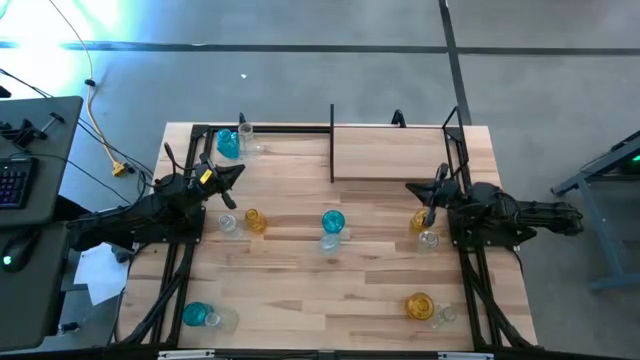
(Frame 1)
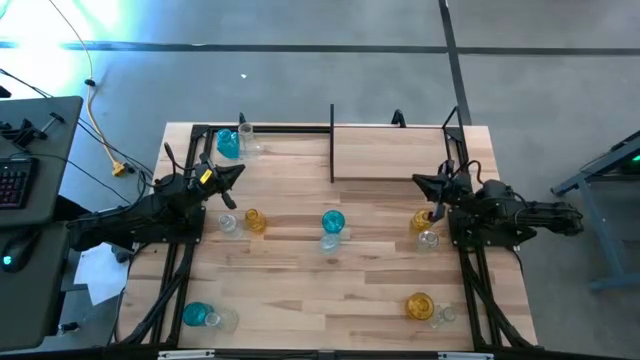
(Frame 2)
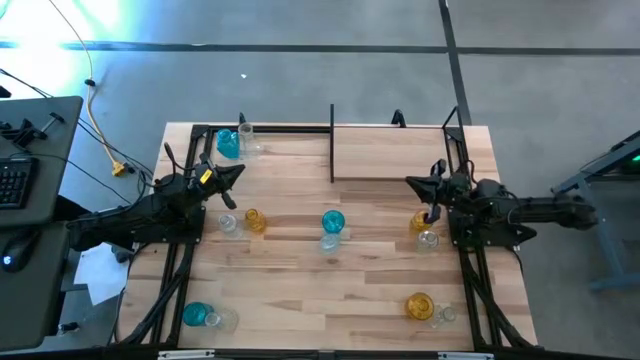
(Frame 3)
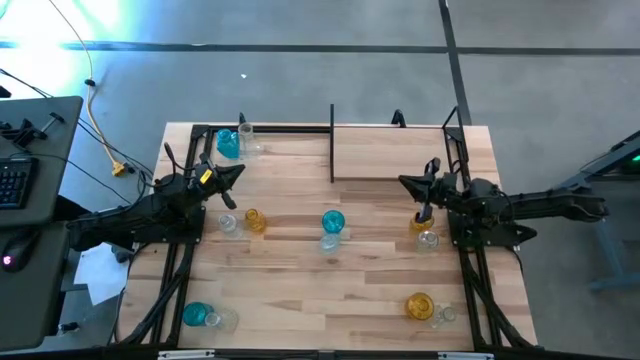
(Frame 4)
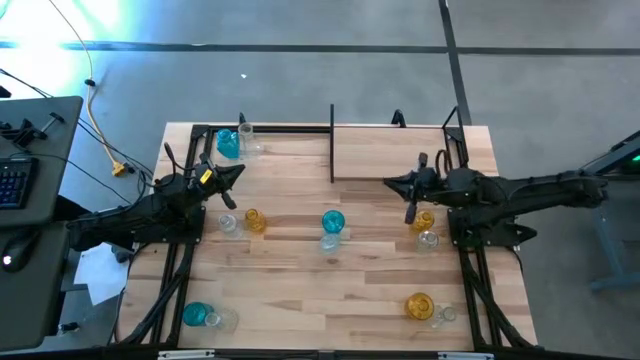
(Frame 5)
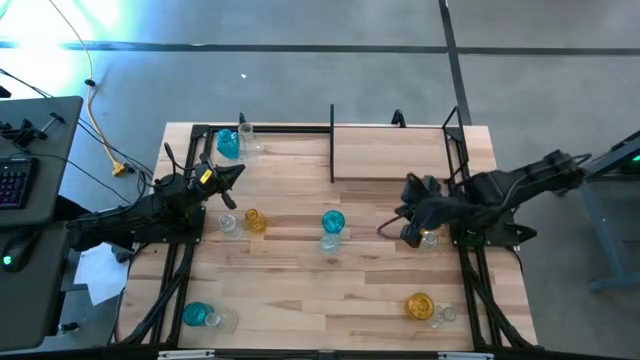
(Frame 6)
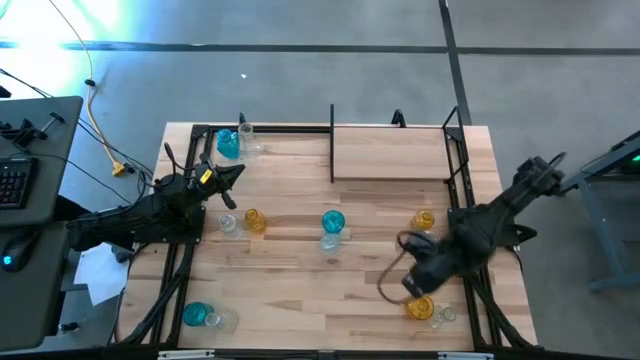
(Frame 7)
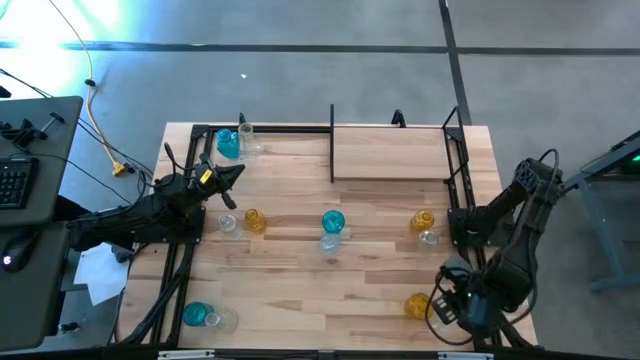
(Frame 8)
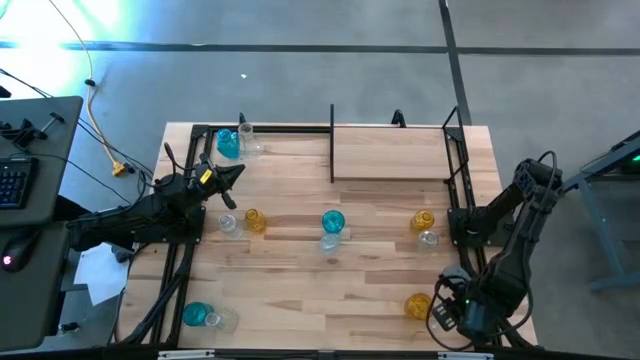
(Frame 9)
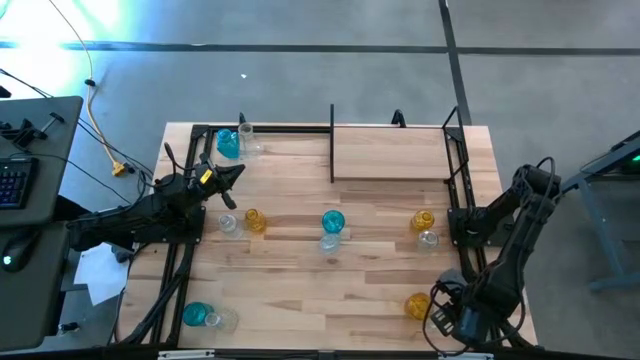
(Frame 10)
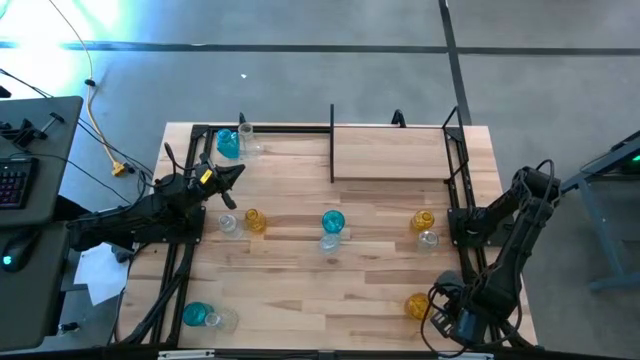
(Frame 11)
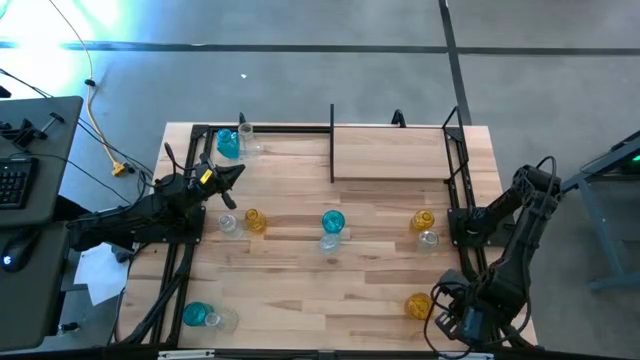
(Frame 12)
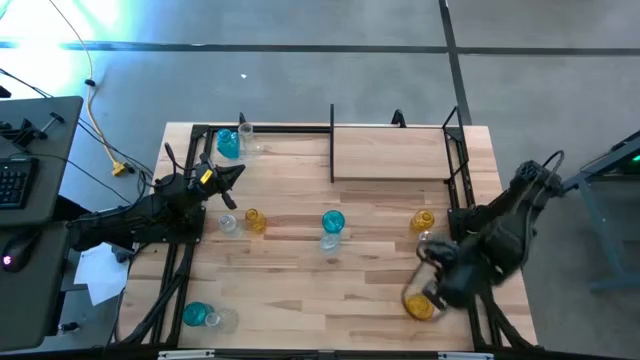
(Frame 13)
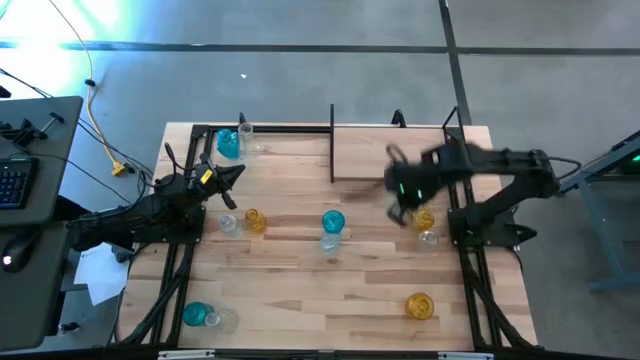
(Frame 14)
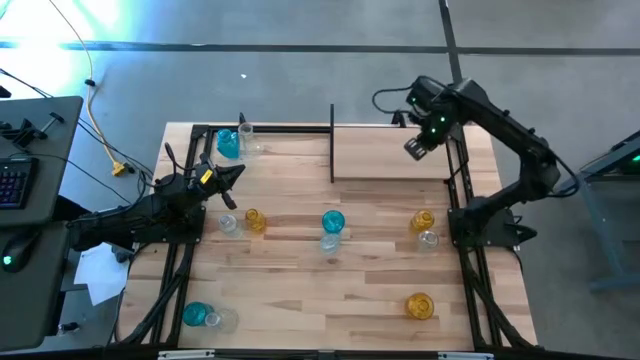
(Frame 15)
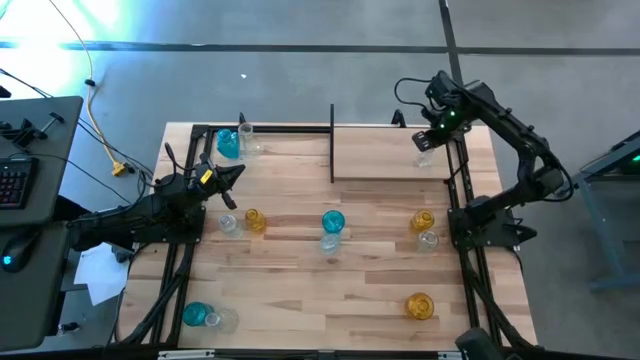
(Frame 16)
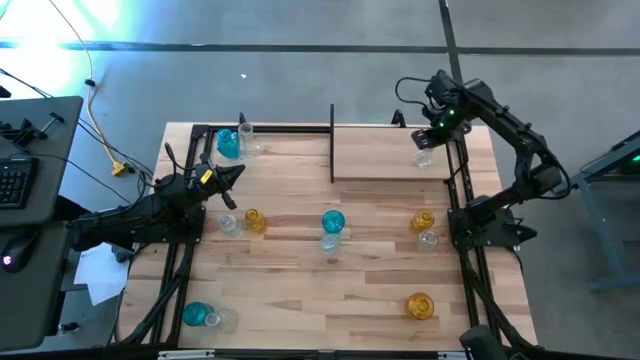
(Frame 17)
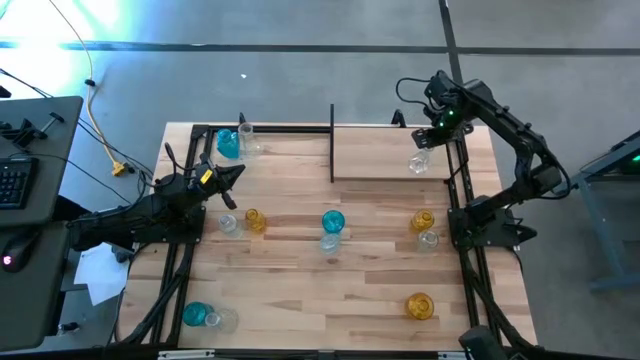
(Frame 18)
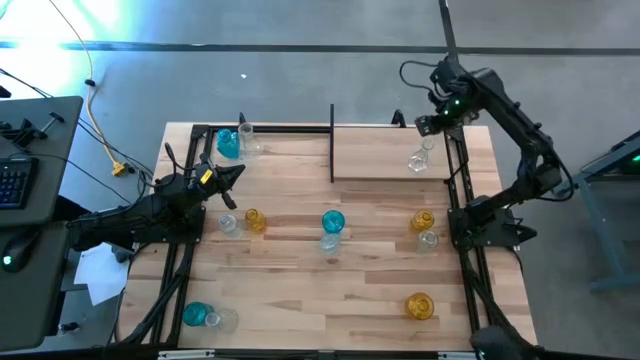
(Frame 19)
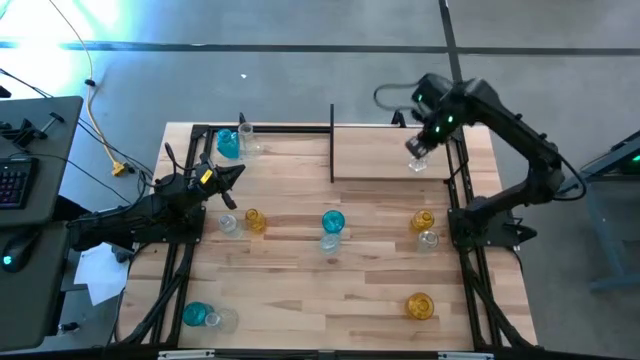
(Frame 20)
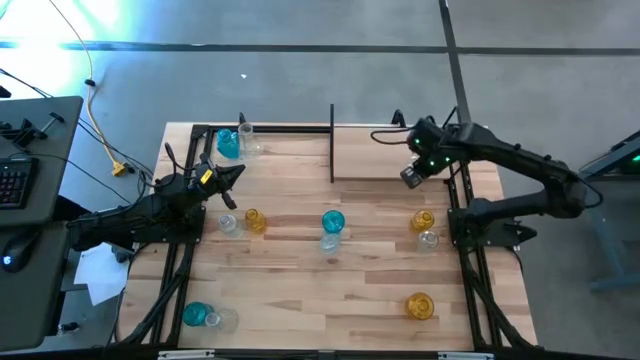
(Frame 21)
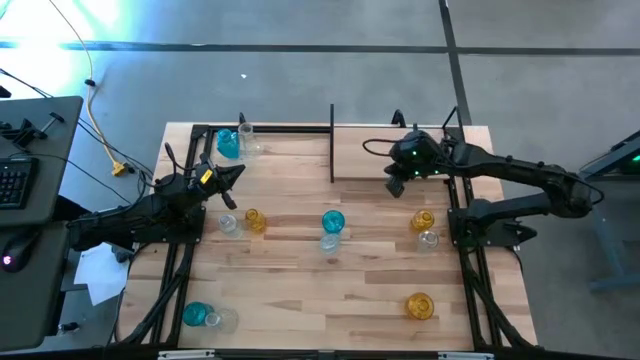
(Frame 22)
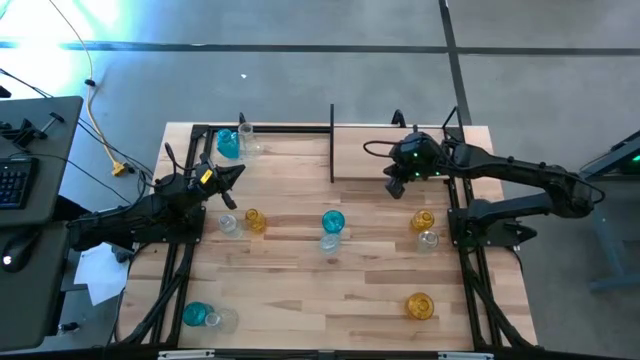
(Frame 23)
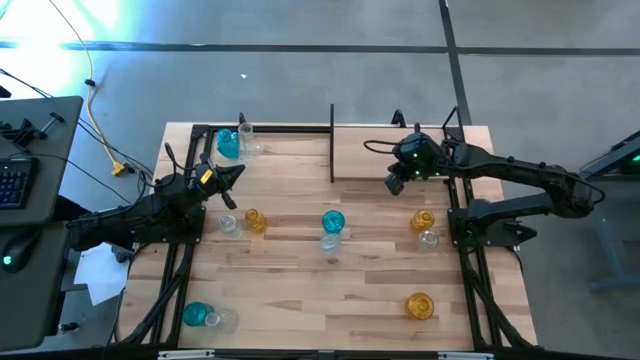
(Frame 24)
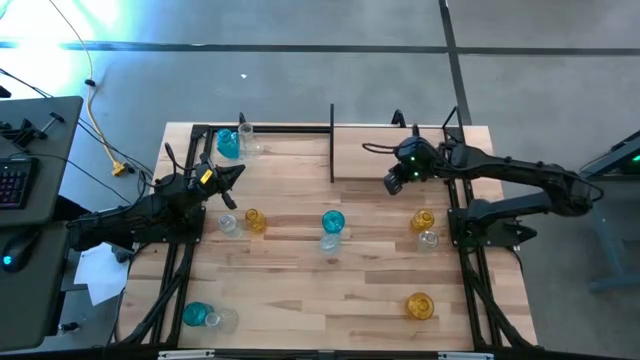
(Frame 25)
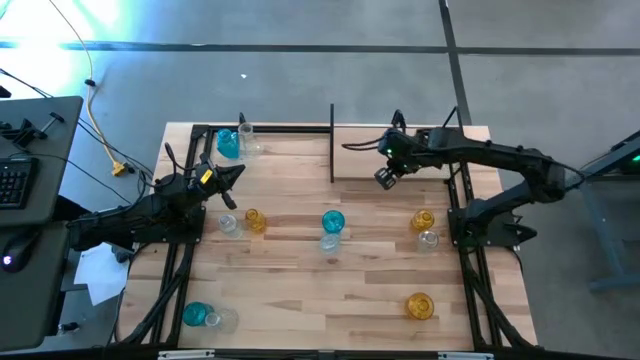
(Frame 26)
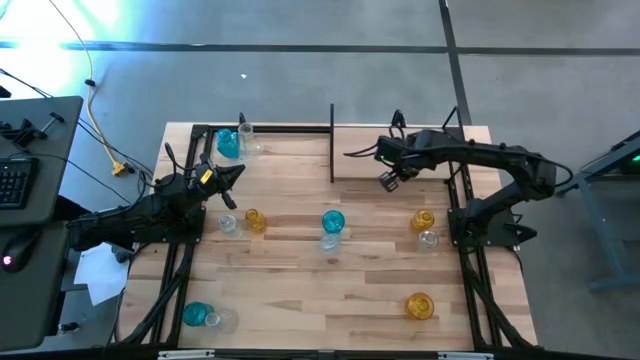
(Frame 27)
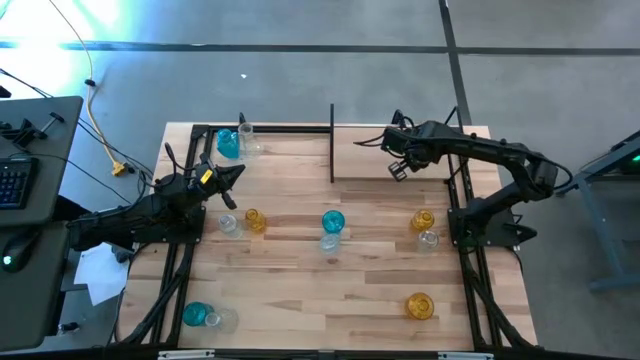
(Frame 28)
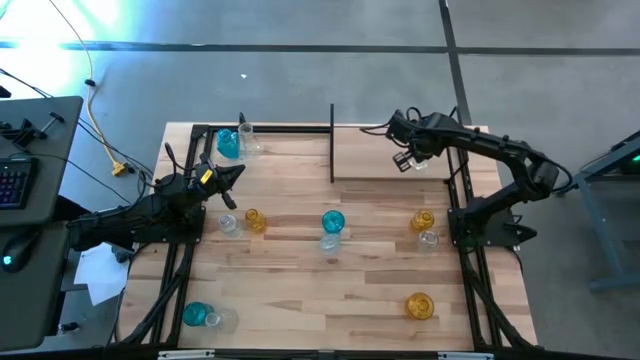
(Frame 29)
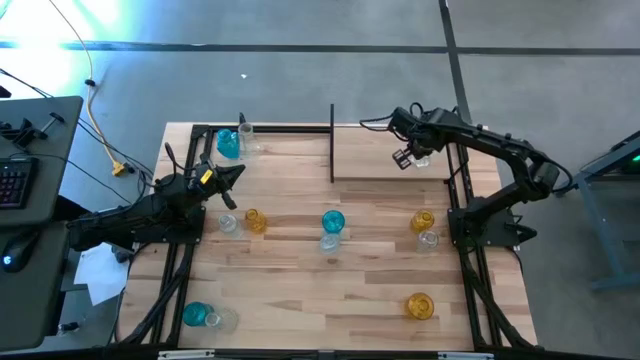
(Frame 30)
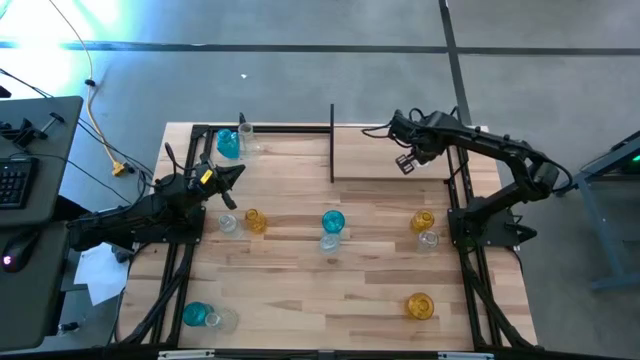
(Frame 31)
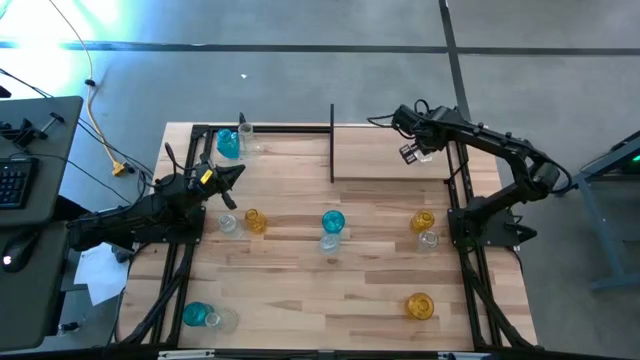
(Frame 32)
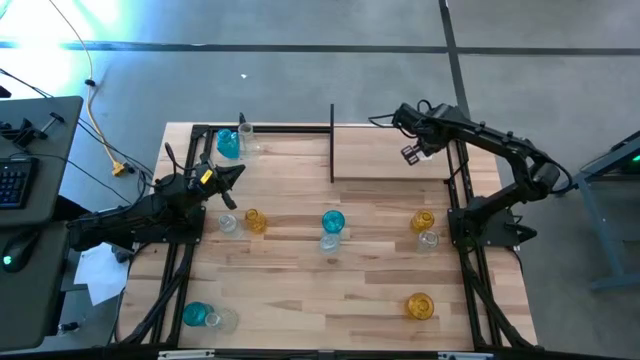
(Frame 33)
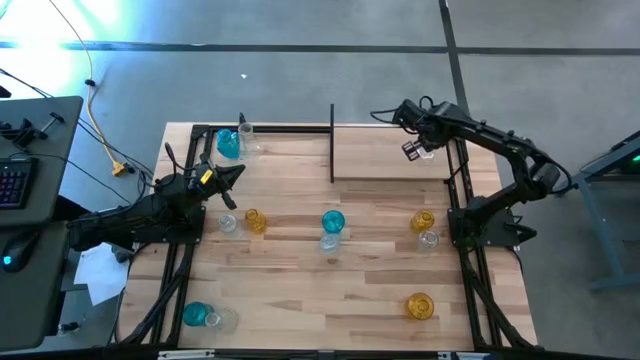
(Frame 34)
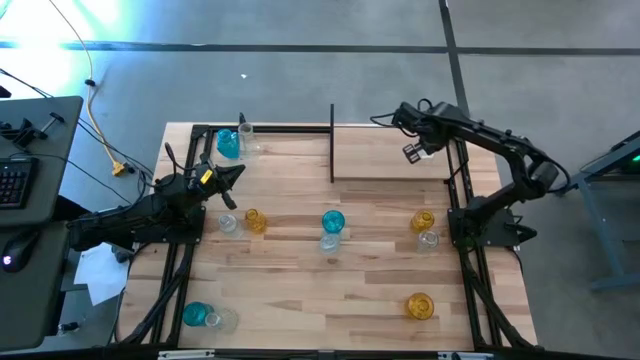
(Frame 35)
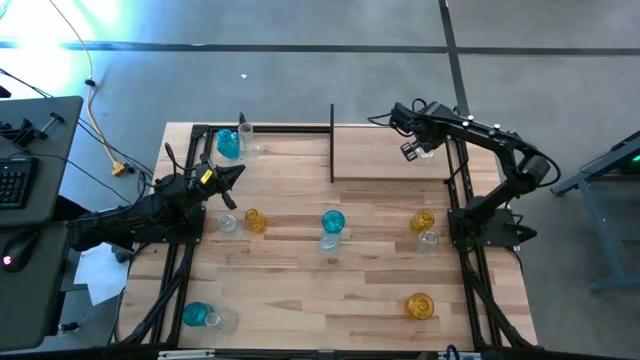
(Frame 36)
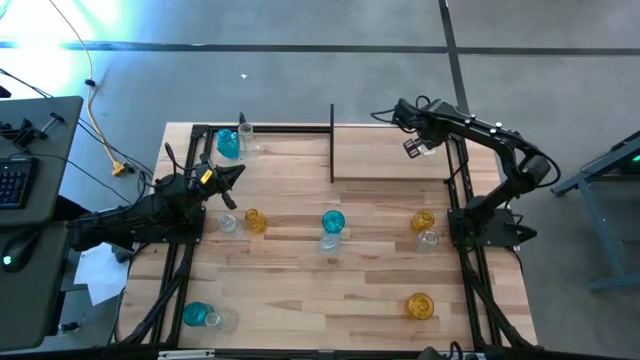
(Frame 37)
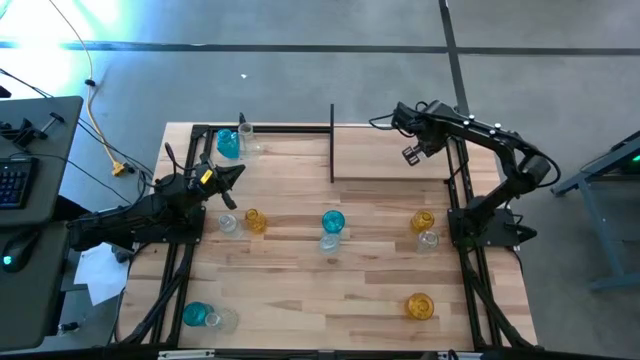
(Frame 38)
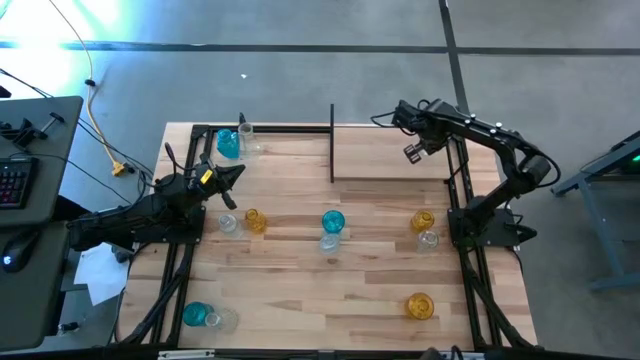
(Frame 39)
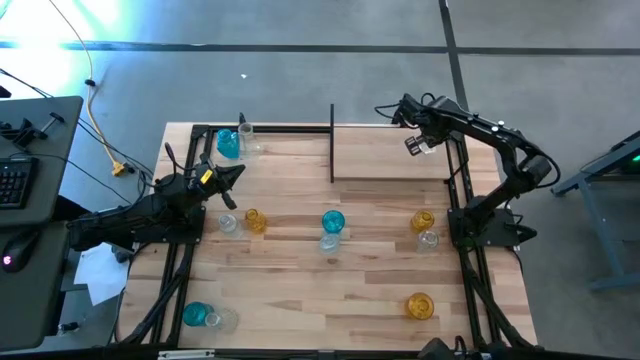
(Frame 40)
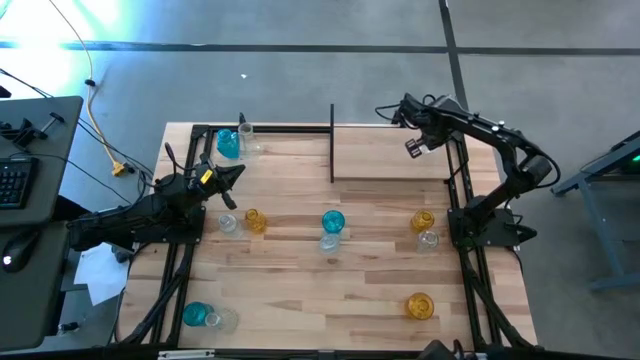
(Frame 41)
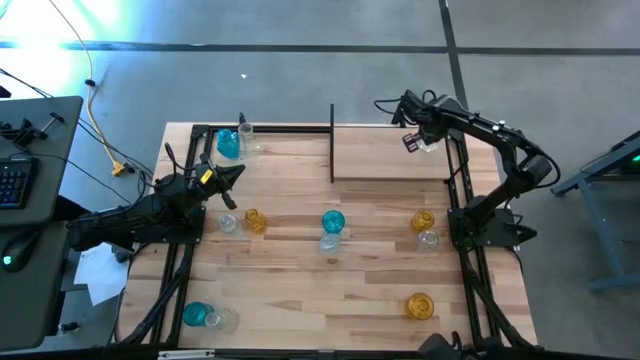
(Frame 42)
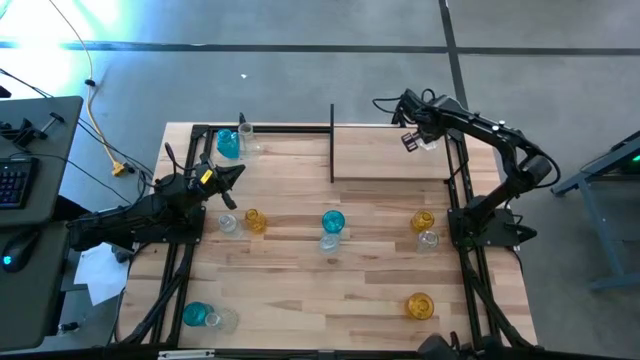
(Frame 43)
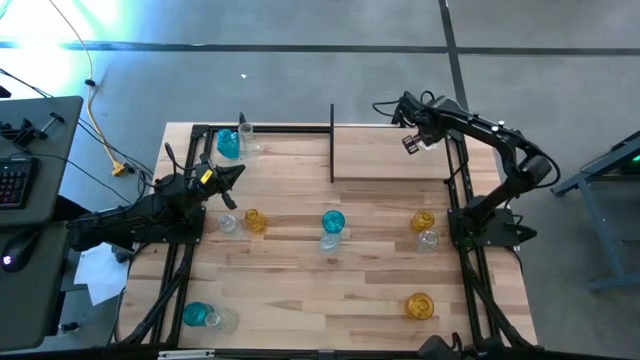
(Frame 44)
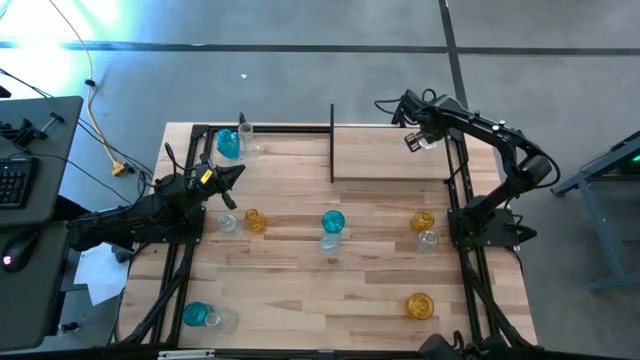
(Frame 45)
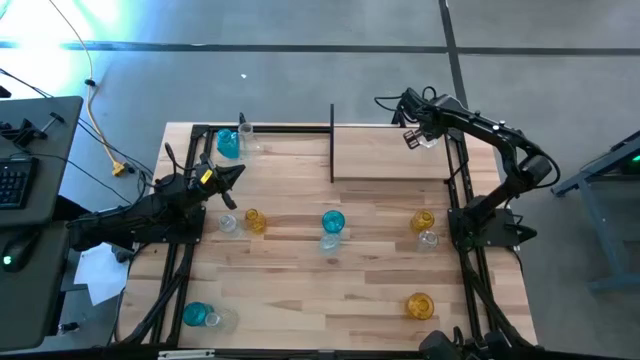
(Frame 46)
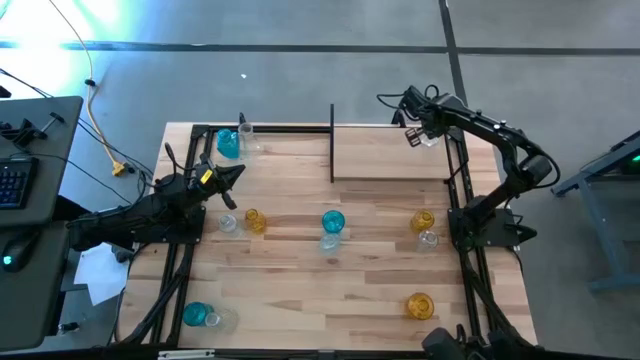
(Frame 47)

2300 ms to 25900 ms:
Task: sort vases onto shelf
Put the transparent vase on the shelf
